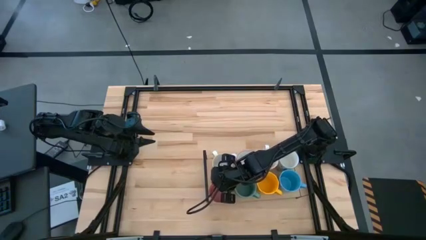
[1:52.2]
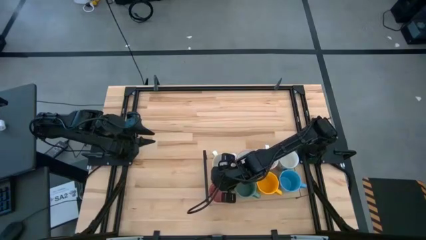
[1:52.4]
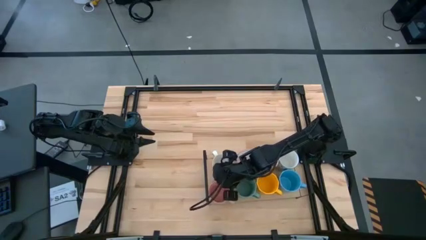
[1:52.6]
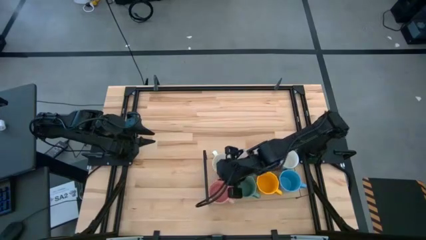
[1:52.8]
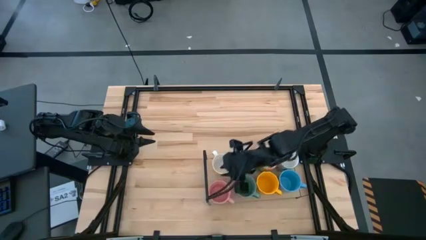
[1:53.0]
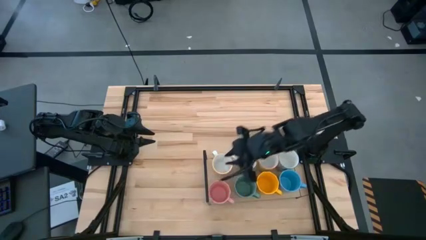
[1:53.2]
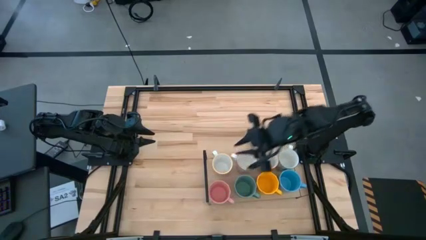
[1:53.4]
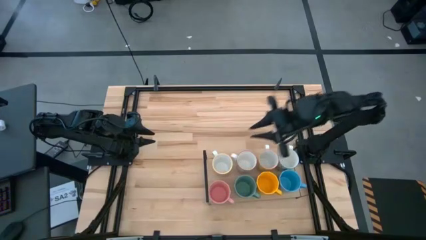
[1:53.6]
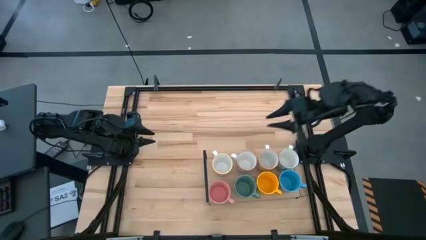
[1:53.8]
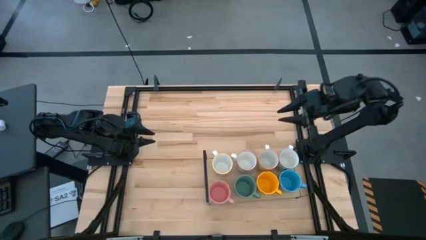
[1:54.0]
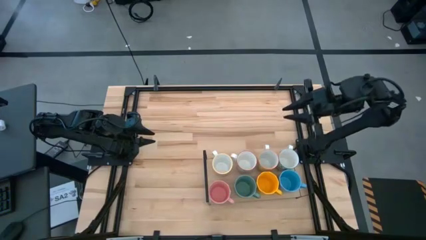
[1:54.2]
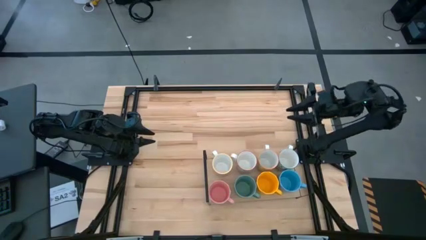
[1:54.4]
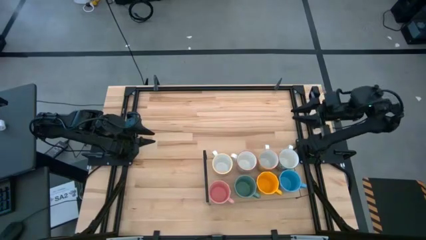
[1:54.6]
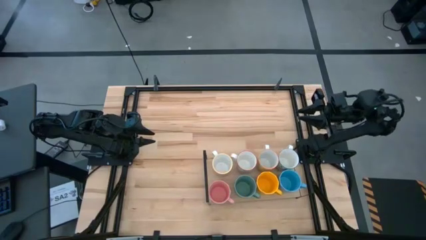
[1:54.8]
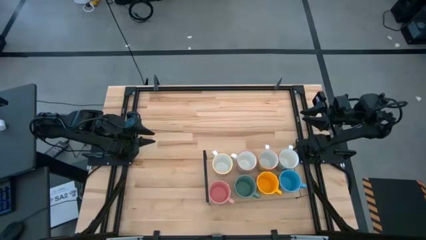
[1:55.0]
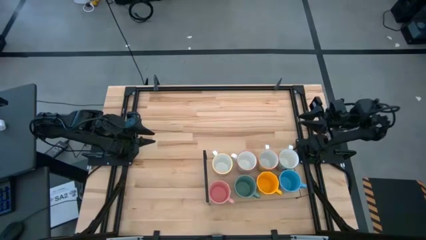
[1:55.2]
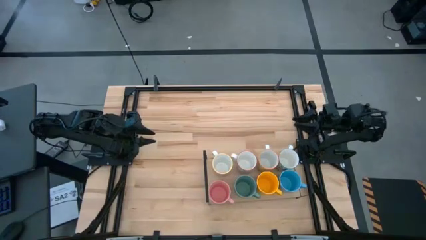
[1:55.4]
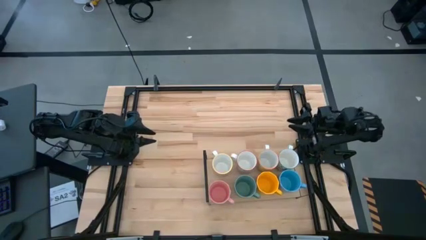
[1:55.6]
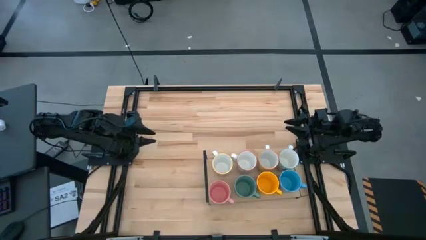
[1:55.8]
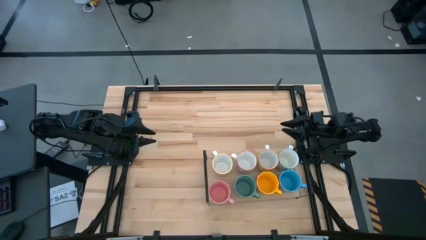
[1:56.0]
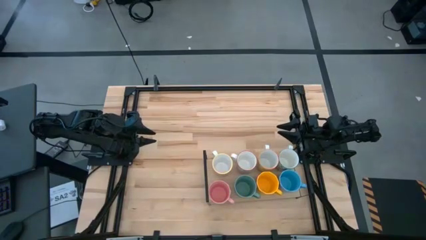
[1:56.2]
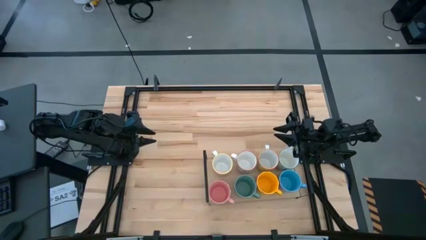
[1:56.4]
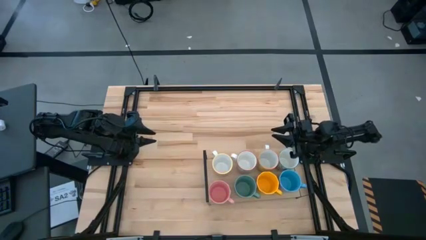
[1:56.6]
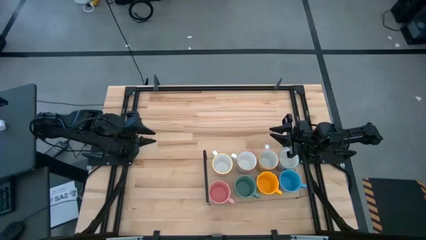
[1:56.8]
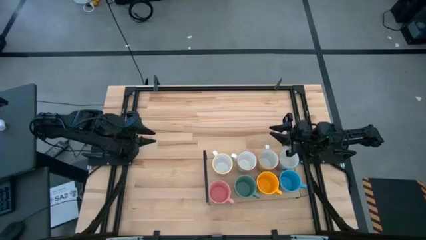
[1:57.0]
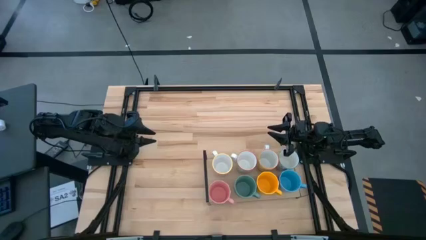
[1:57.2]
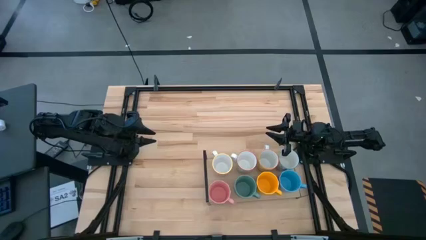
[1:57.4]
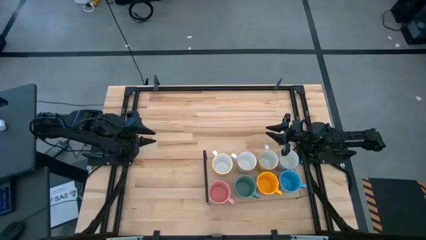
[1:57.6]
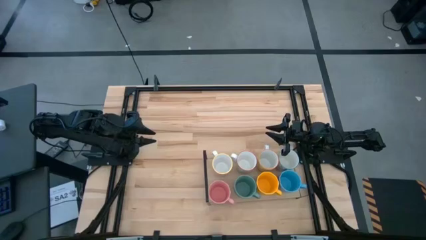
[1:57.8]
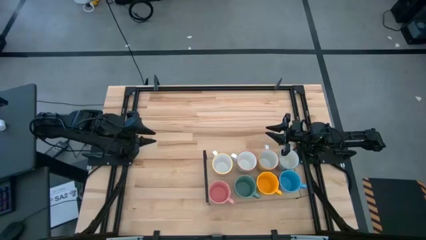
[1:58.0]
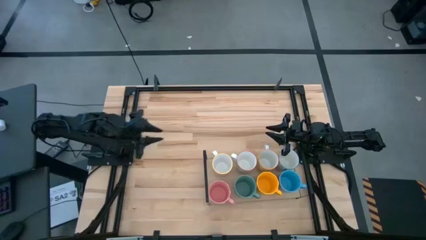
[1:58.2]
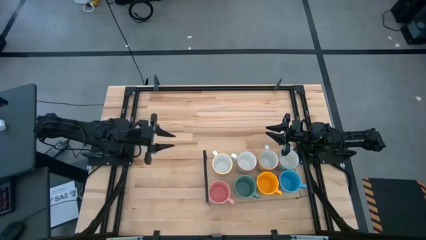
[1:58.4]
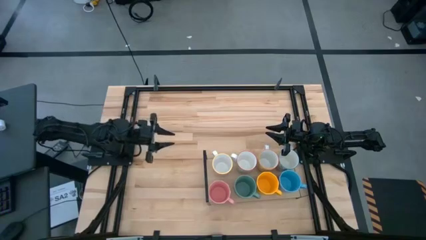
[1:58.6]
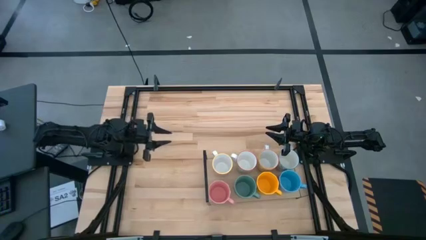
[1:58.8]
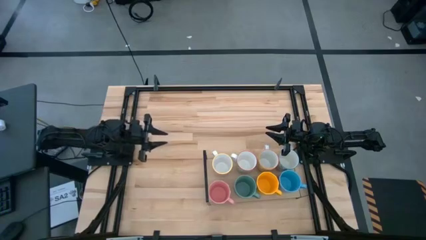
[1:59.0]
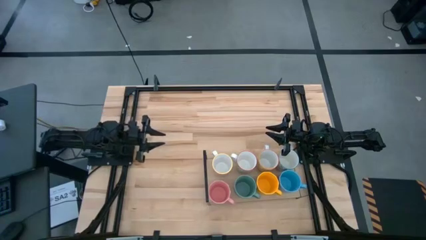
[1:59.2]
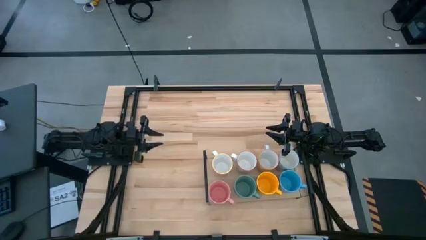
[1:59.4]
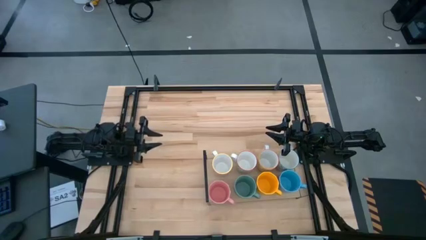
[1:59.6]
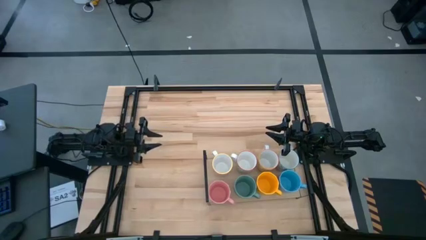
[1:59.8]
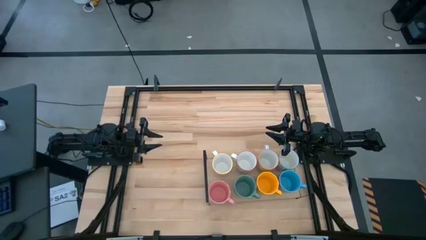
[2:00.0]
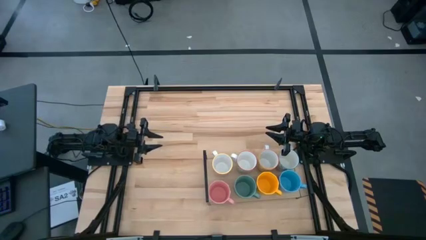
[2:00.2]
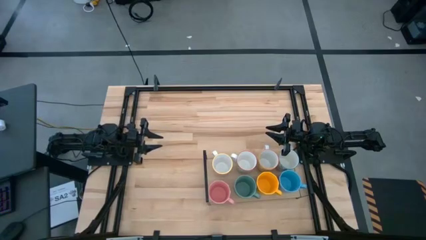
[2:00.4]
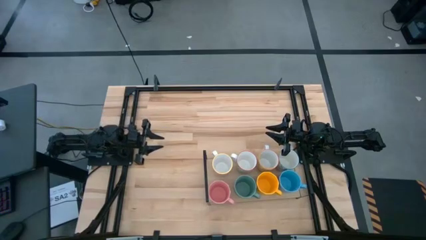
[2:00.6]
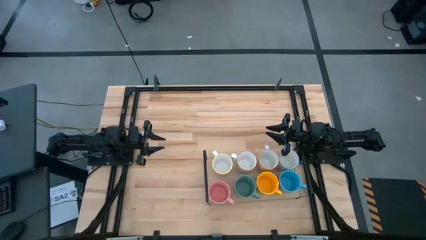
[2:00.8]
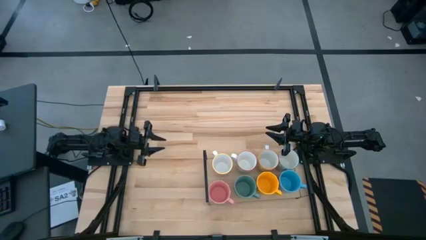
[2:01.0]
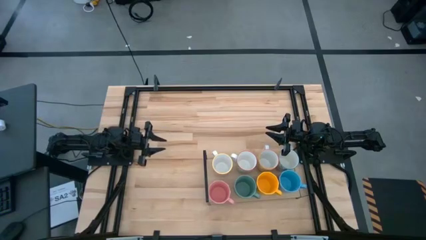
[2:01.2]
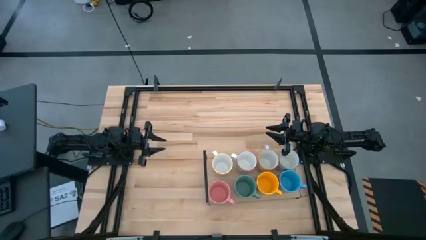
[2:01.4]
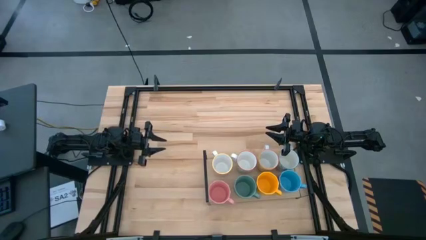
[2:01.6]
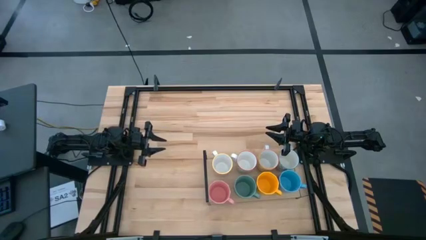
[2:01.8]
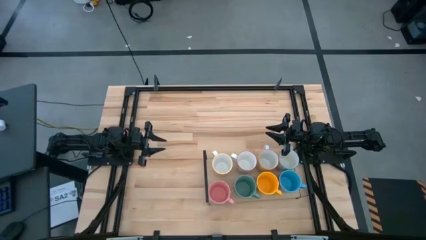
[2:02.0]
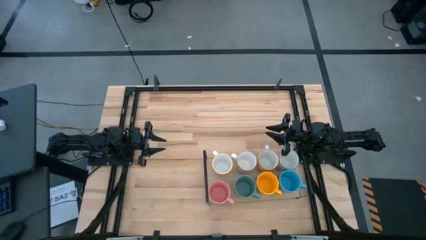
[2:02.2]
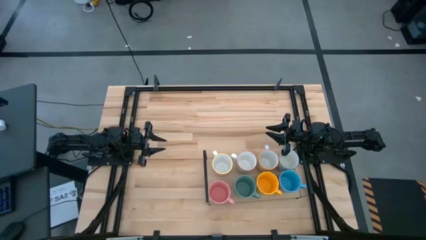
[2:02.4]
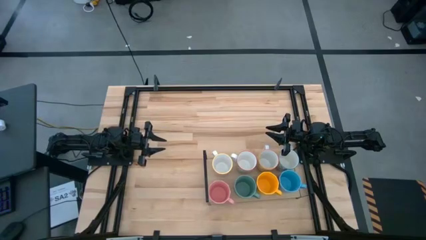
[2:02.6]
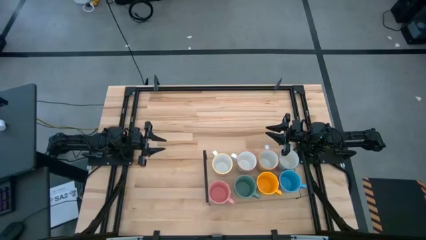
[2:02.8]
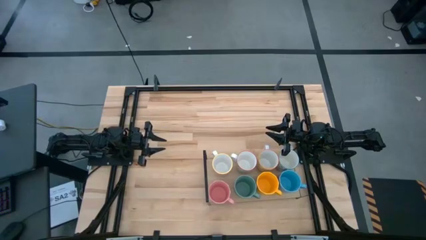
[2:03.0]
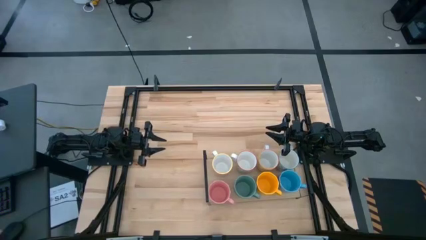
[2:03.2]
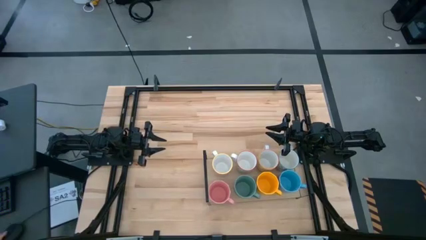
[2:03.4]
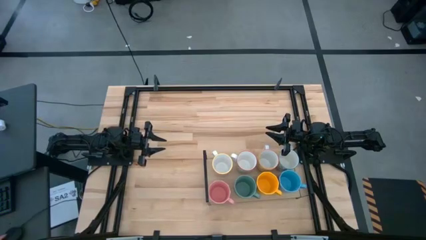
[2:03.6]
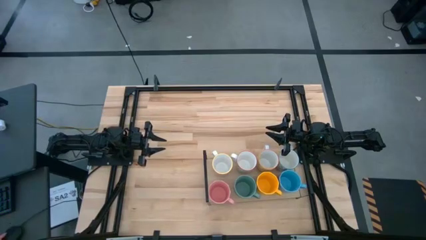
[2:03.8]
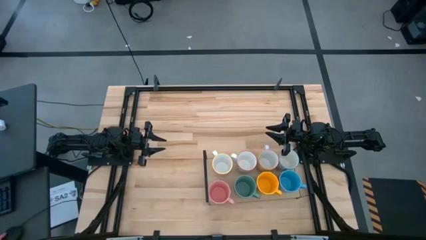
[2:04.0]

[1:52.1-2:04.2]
Task: Place coffee mugs
Return to Home Position

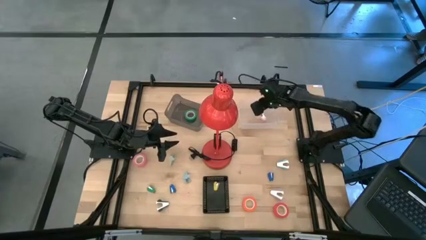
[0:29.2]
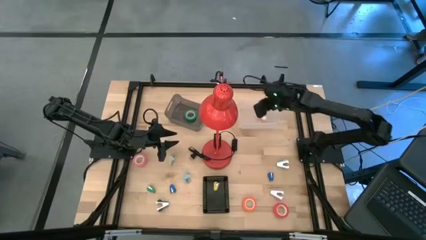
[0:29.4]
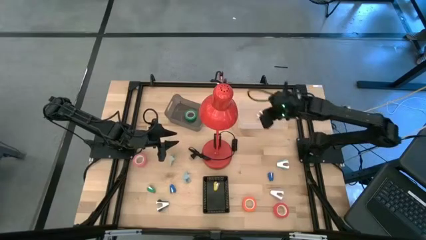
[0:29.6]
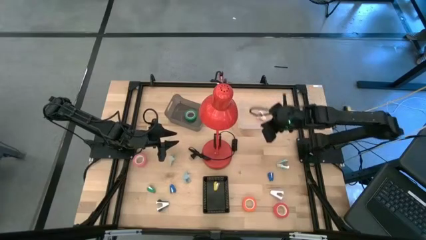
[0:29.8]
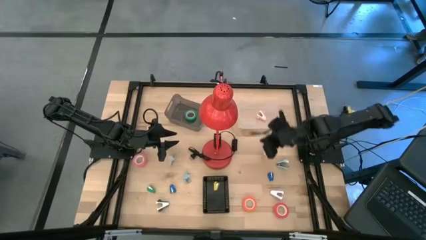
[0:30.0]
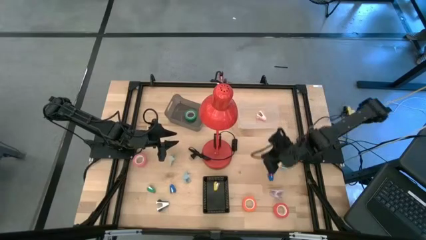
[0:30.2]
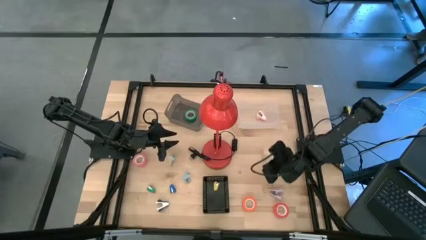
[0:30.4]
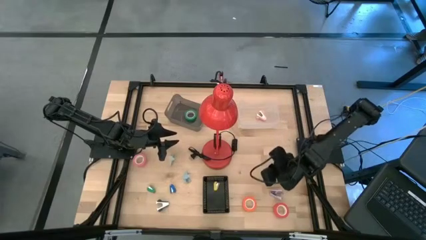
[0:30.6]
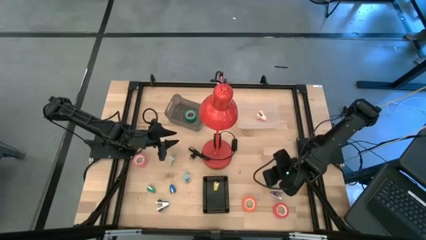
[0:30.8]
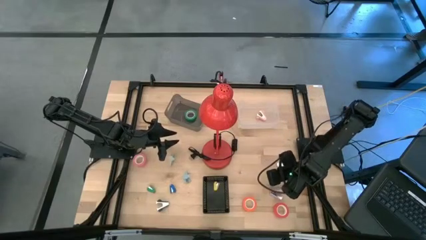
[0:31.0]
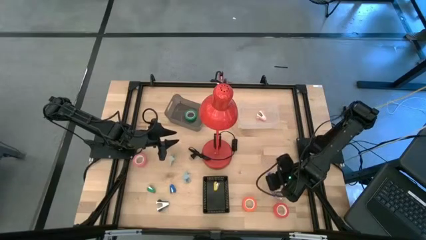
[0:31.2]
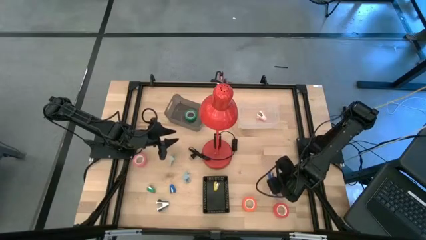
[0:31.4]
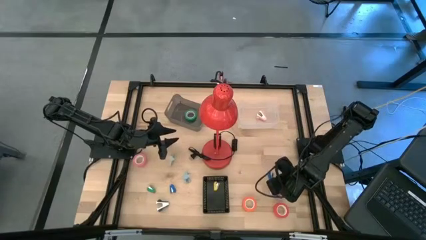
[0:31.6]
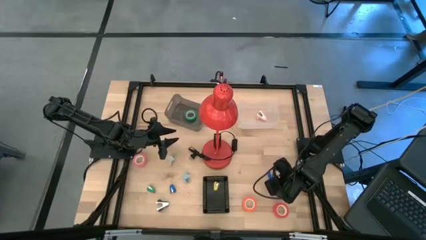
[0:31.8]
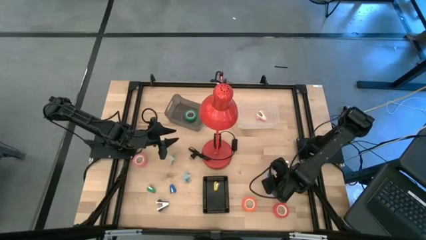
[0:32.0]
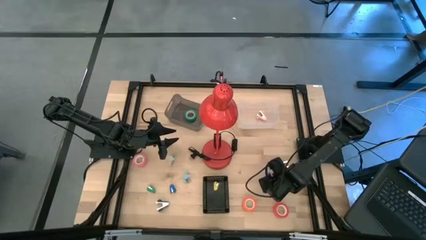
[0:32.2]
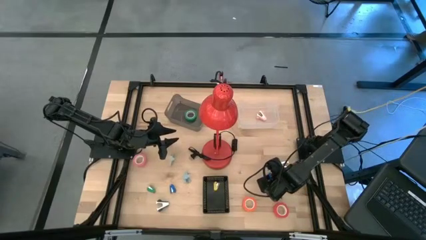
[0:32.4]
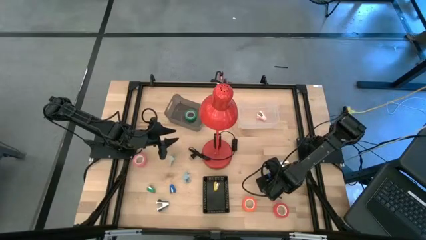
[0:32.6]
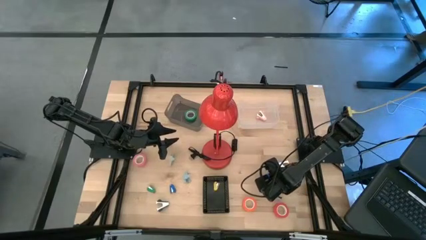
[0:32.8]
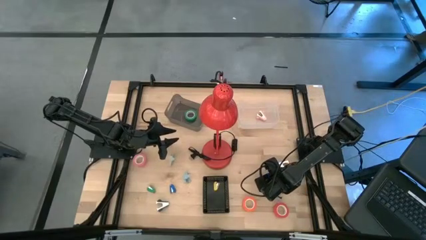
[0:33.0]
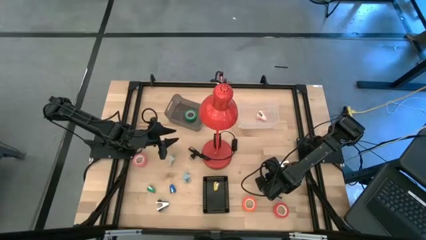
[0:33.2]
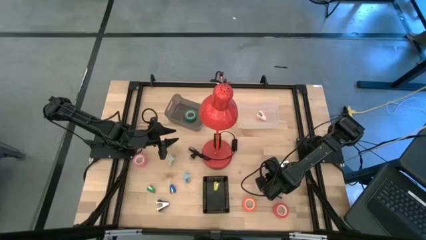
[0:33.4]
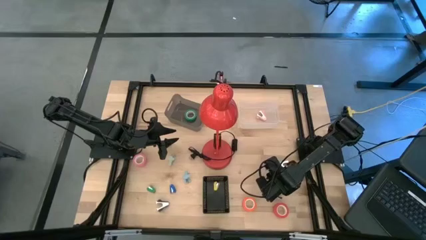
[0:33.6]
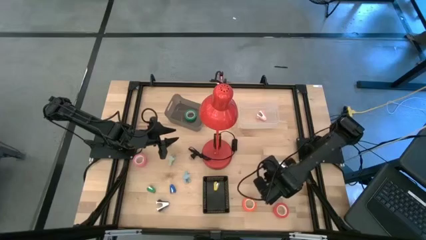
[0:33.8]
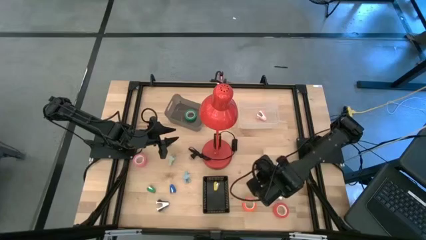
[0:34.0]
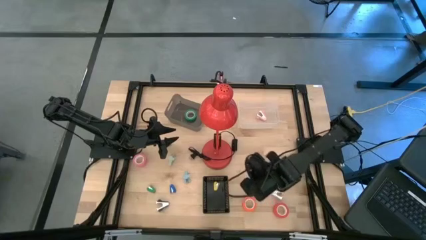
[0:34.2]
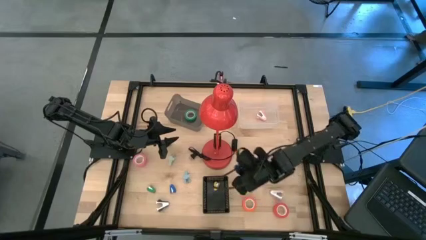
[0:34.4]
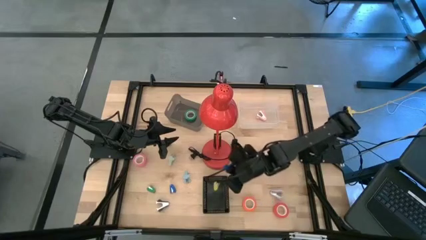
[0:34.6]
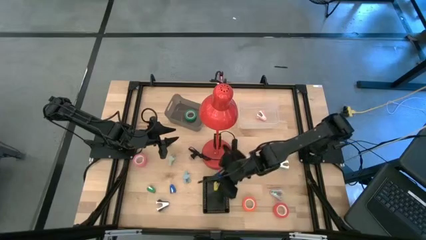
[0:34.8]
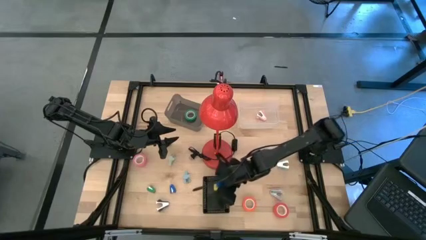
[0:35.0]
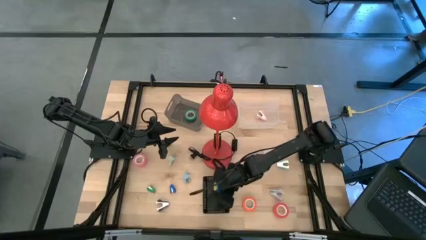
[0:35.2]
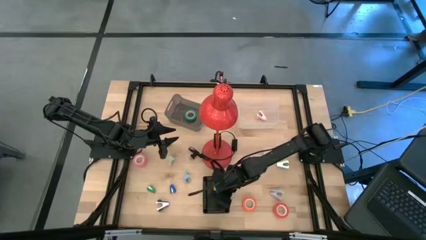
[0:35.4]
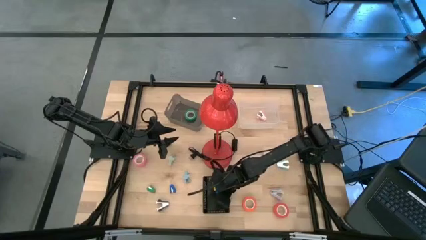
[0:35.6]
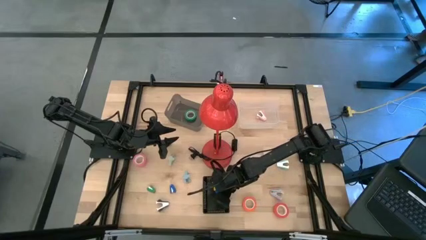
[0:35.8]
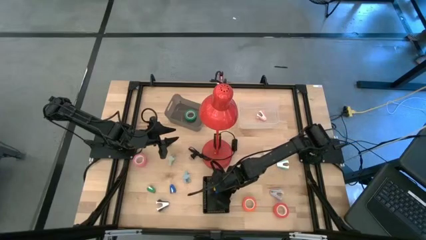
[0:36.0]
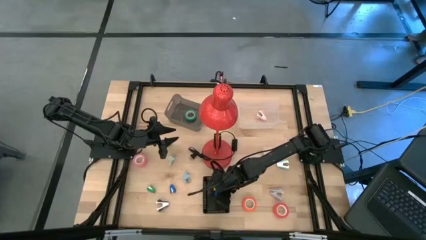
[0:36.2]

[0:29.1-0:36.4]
Task: Pick and place Stapler, Stapler remover, tape
Put the right blue stapler into the bin
